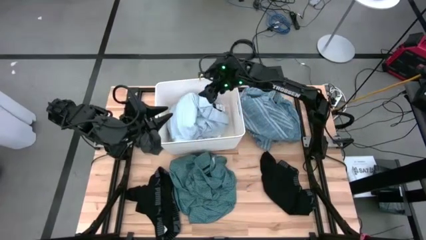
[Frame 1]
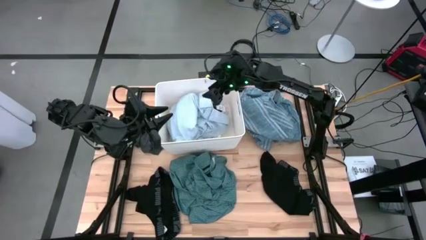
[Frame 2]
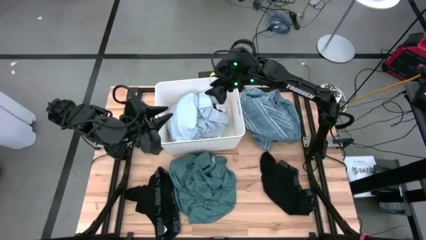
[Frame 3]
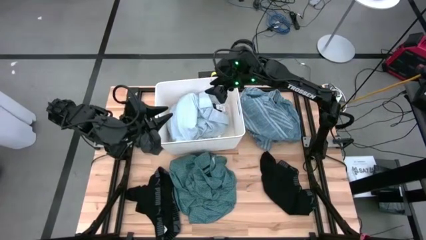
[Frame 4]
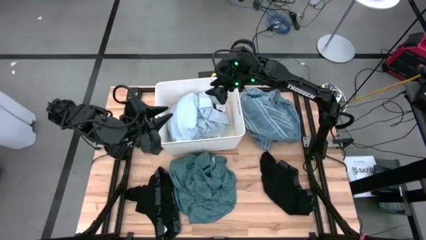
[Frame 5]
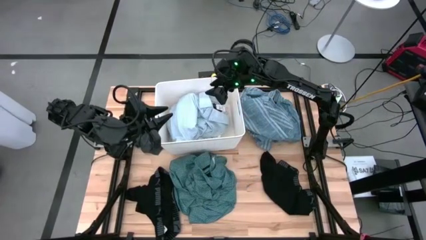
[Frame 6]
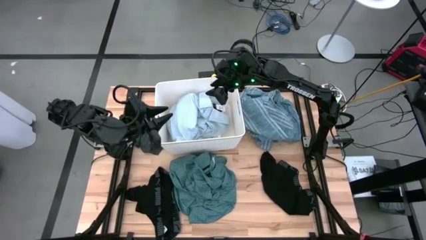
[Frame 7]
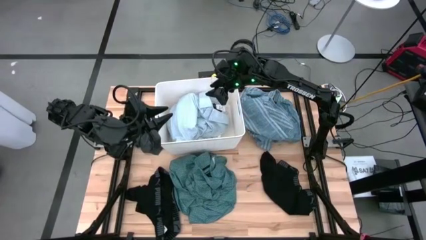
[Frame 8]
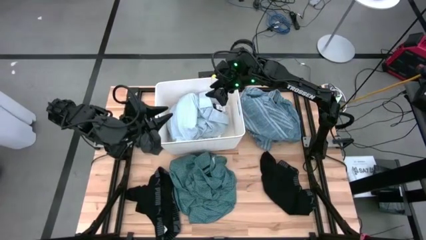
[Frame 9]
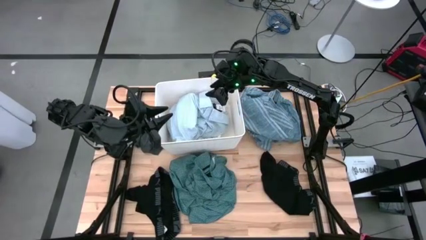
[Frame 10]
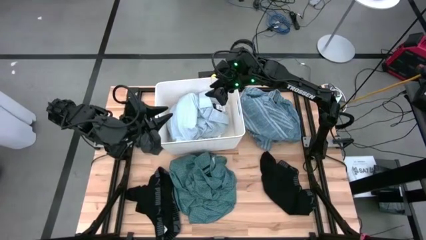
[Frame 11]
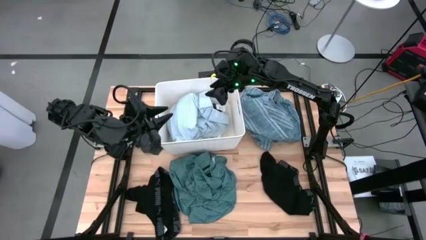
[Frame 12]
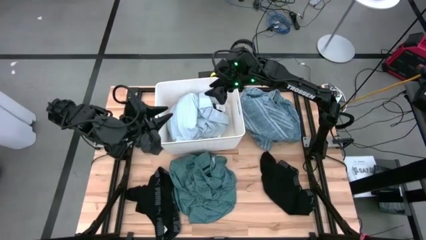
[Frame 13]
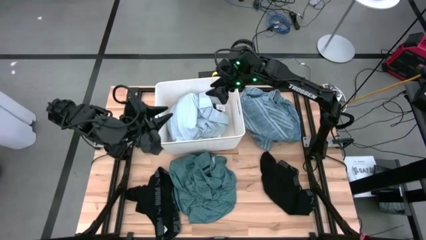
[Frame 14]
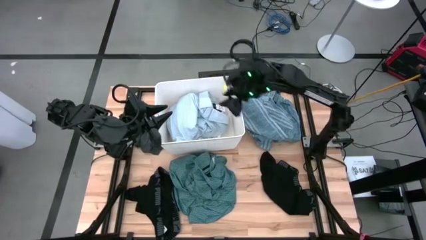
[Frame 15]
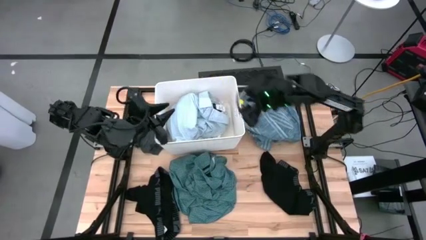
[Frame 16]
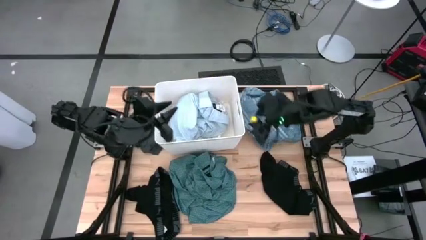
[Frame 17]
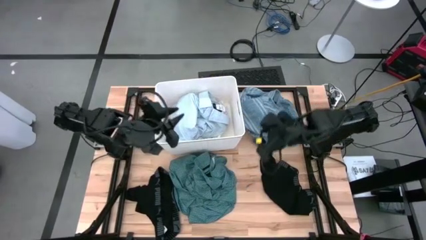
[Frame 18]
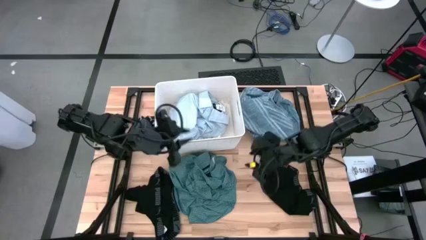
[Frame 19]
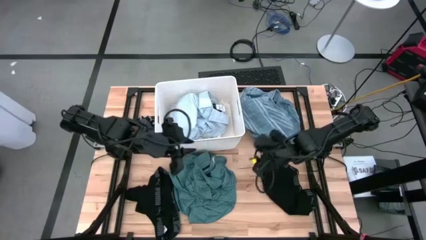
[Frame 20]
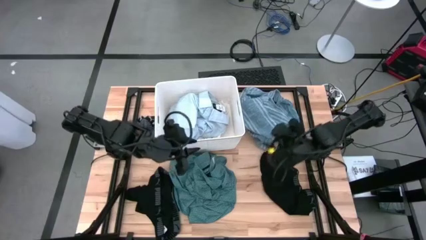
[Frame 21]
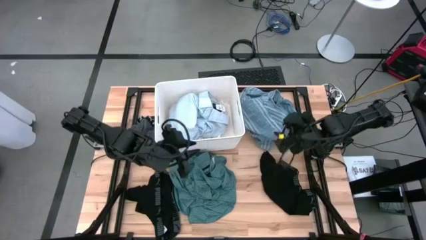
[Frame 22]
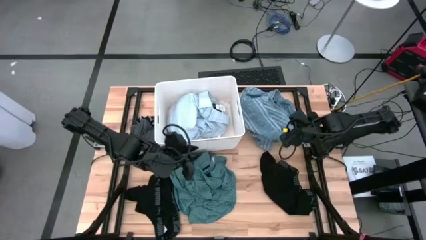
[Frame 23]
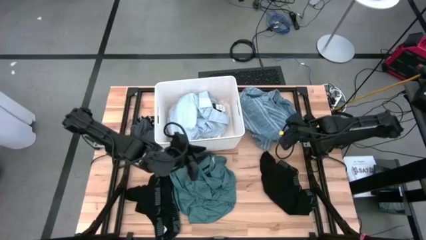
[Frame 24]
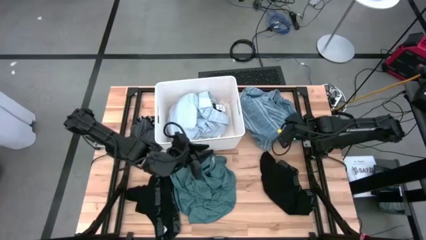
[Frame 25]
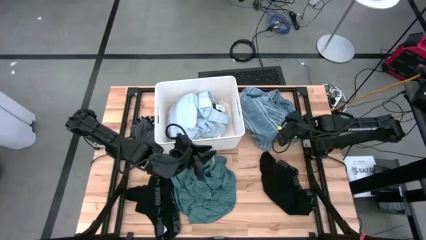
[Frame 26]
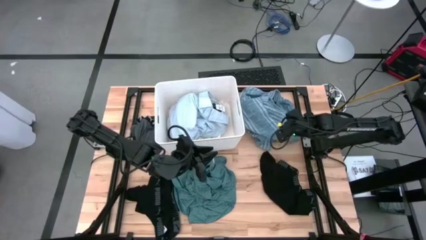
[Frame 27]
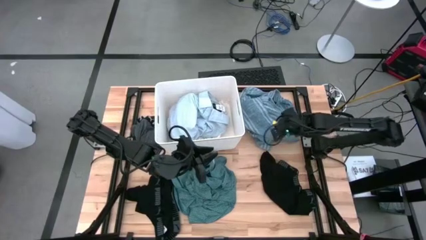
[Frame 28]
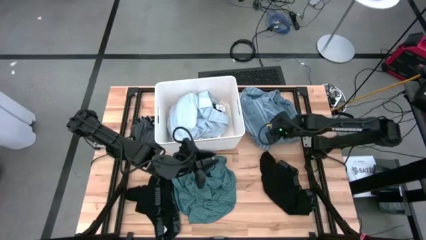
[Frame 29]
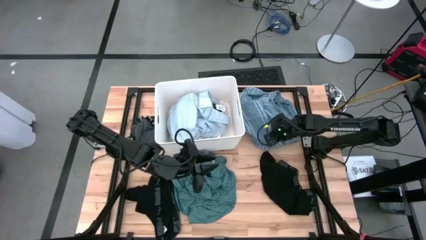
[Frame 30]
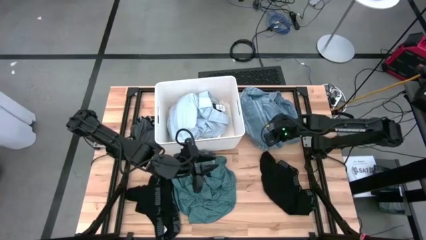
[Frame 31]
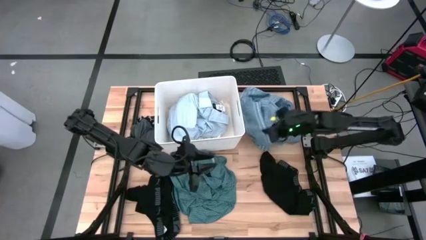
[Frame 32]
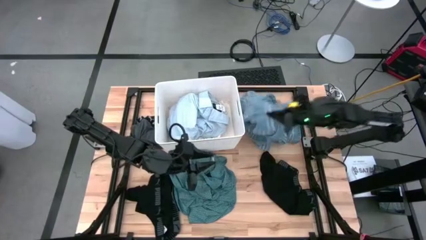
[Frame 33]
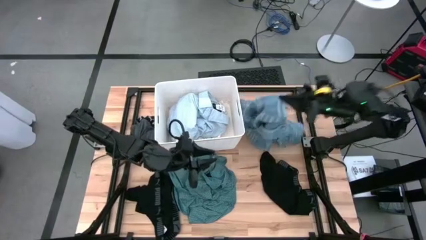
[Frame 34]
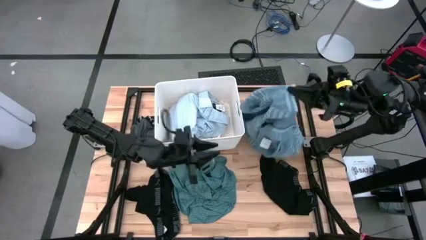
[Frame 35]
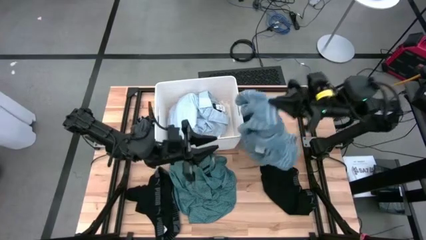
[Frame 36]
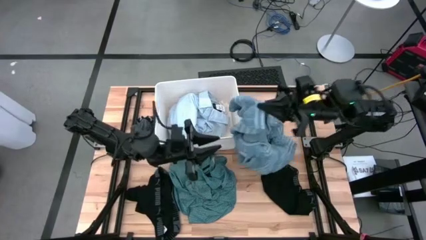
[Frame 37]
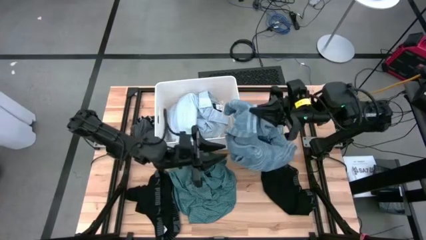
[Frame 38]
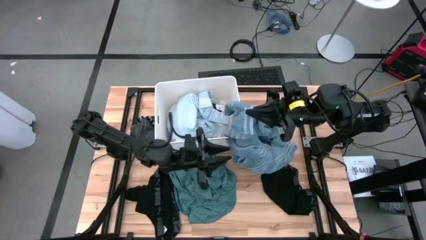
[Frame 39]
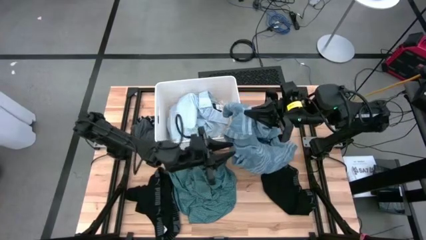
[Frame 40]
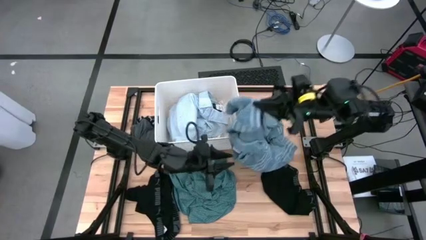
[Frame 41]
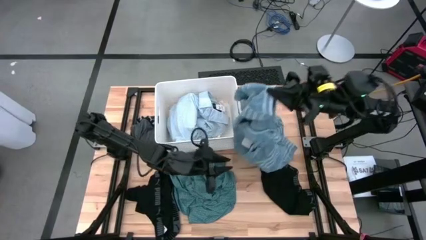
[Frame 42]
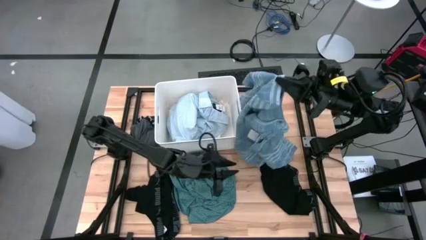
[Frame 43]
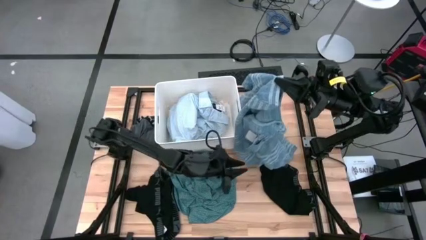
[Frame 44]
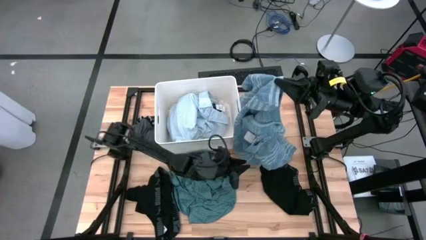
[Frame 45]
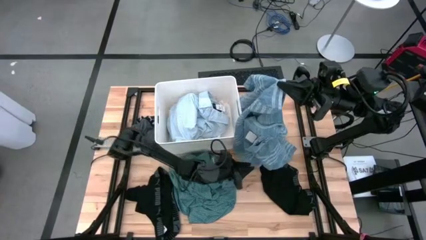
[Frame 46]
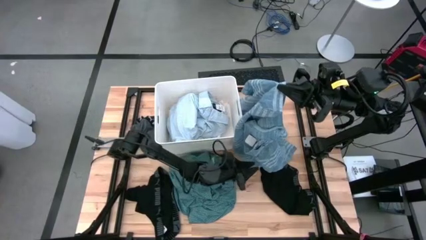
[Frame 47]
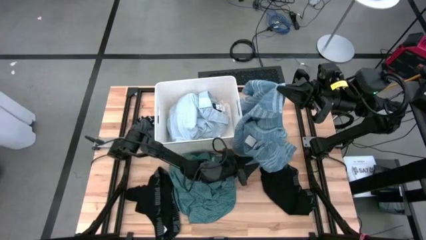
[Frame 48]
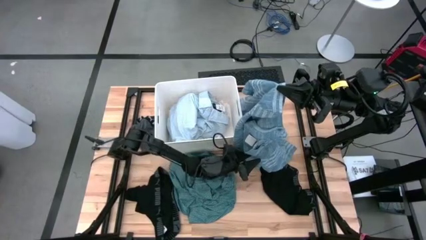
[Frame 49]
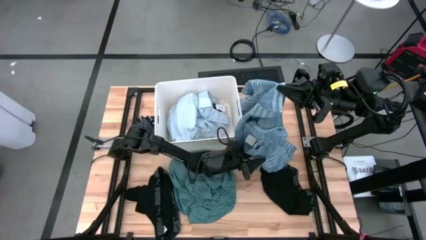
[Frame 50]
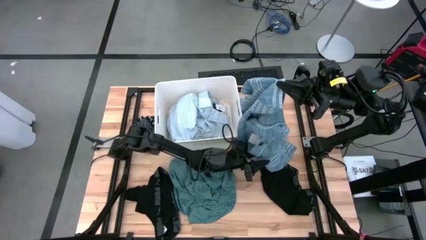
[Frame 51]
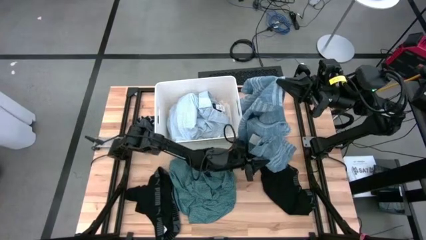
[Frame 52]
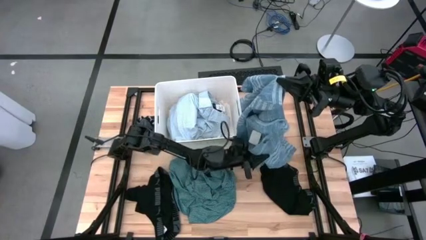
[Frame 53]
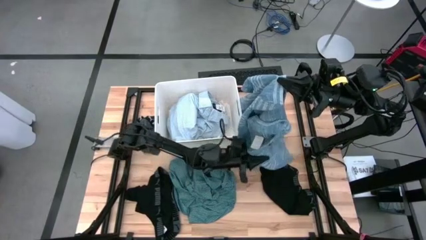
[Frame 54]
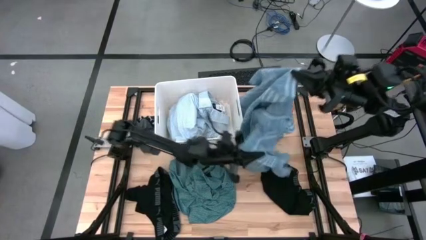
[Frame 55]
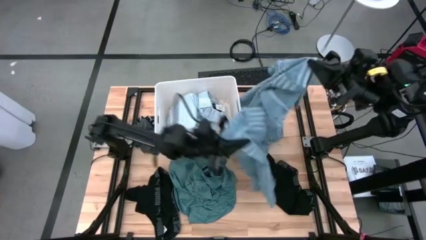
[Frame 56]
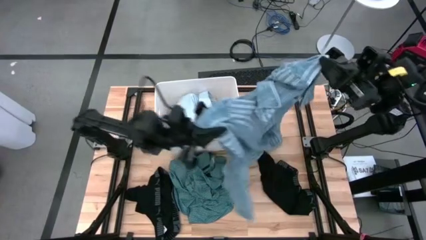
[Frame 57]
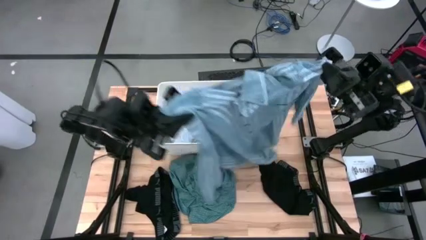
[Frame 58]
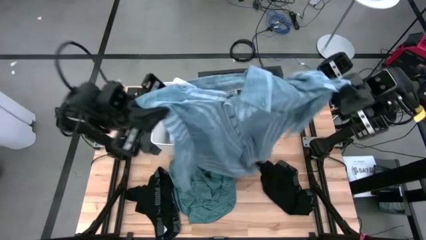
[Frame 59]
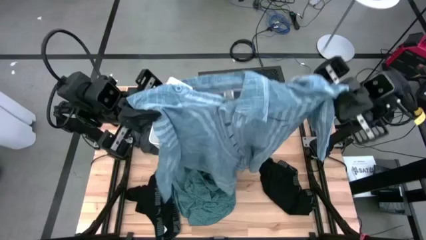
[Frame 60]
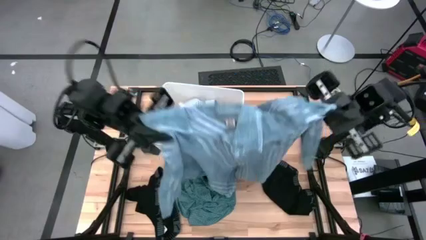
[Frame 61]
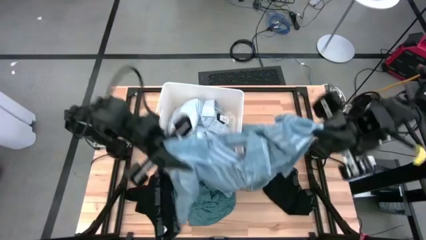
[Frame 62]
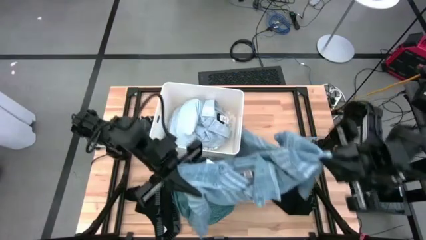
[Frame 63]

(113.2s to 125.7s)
Task: Sort clothes
Put the blue polo shirt into the white laundry organizer

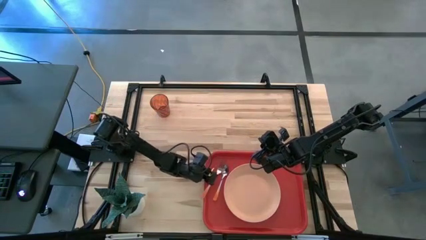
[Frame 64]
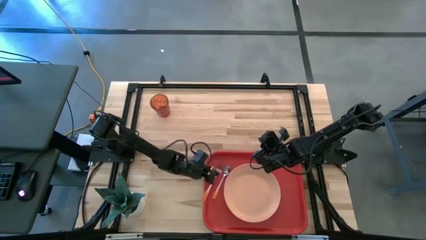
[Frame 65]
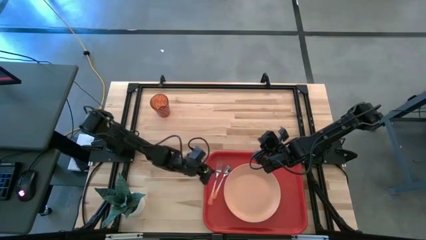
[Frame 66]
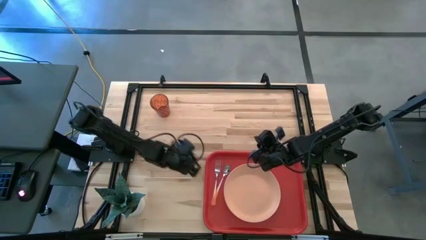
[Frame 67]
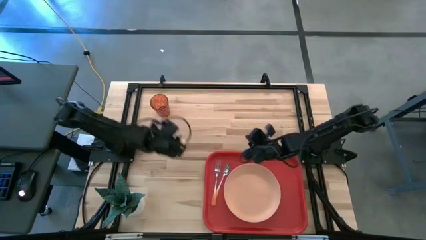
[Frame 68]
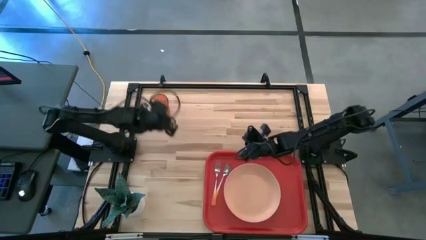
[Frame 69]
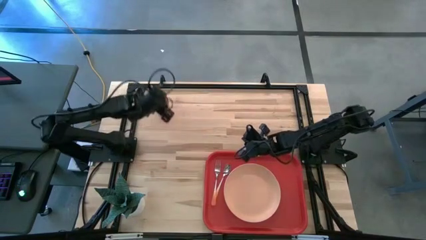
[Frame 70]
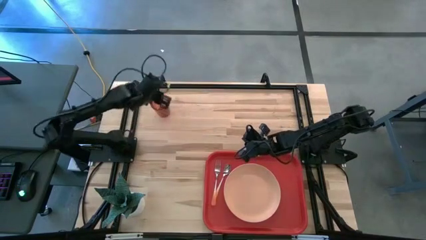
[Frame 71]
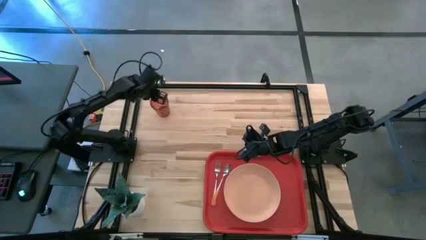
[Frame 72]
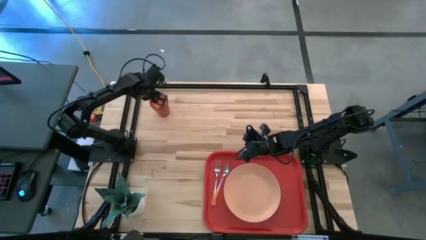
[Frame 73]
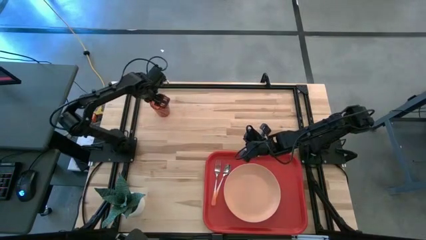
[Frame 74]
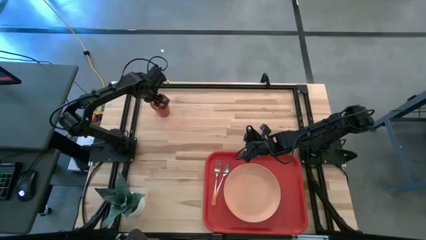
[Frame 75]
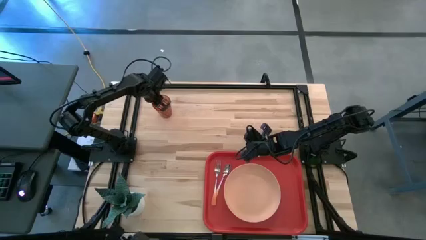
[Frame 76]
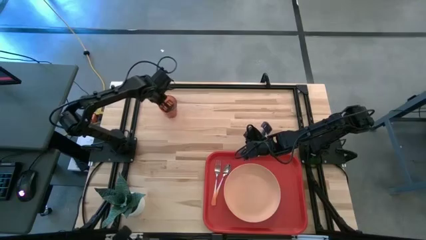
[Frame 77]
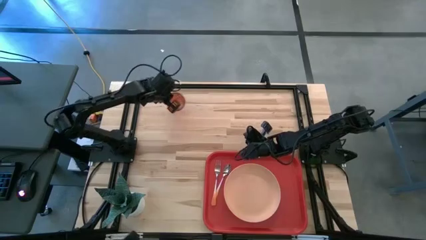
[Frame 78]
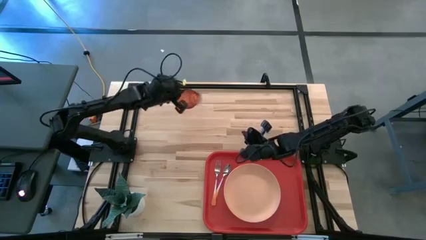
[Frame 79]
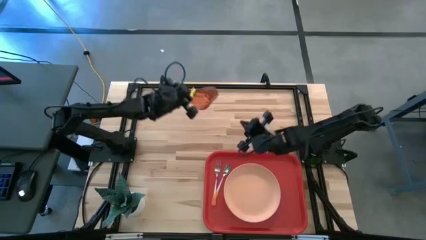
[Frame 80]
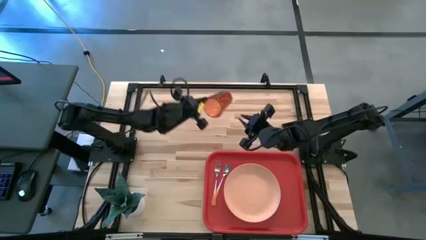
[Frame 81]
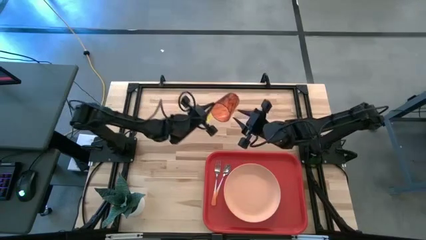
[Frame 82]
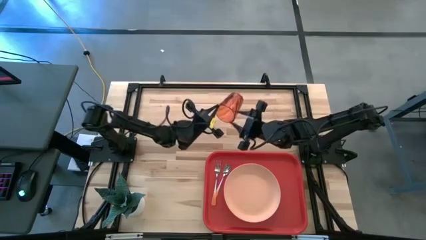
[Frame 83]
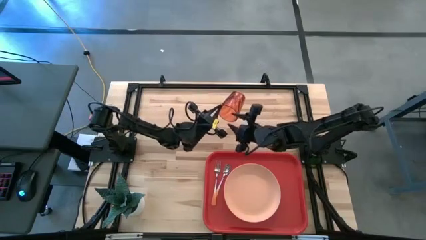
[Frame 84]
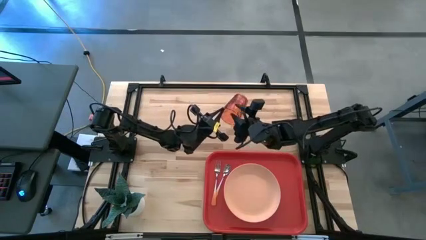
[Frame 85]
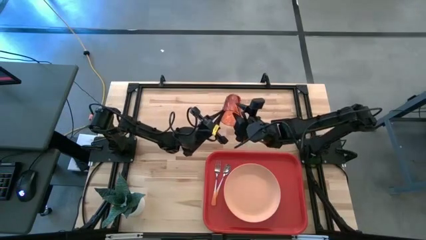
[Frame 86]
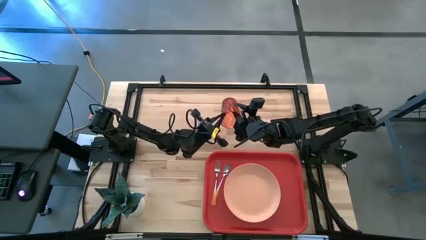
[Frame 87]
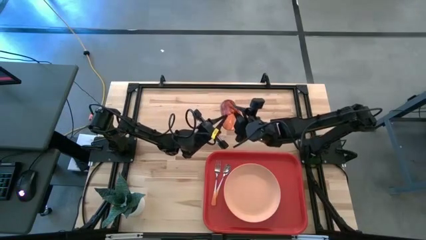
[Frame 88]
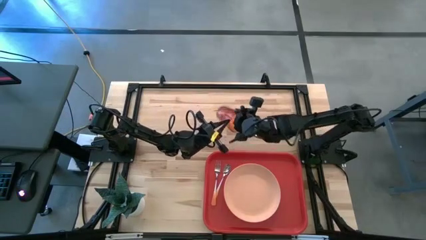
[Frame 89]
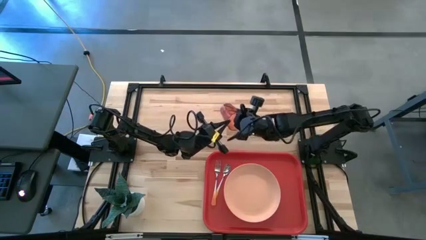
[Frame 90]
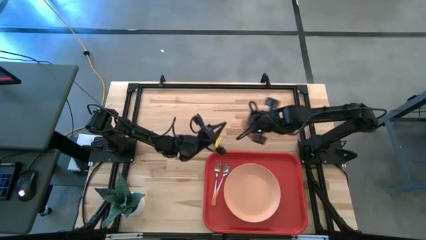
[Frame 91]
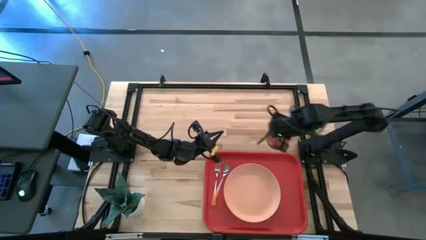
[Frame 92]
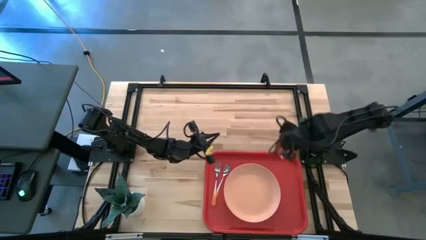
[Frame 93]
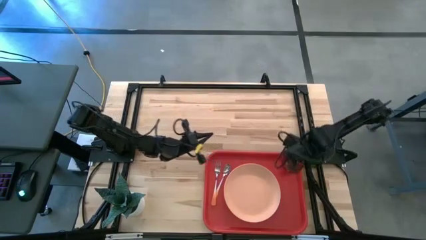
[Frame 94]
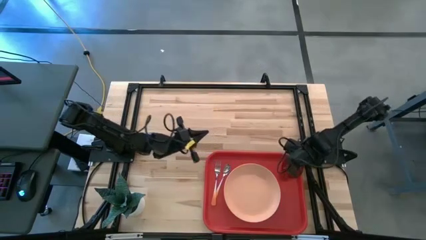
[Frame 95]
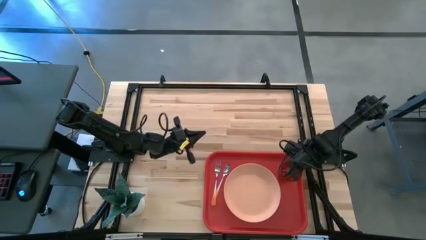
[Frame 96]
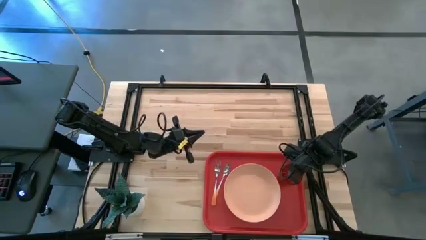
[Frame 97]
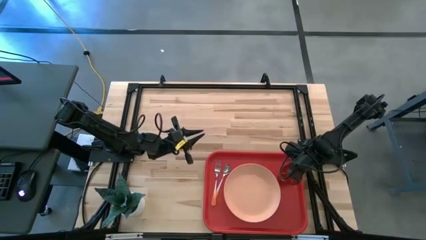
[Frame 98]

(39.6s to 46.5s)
Task: Pick and place plate/cup/fork/spoon on tray
Put the orange cup on the red tray
